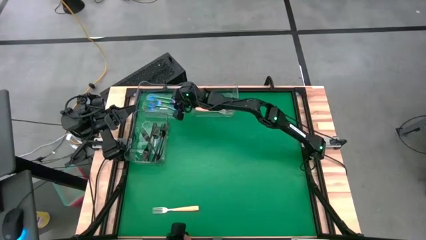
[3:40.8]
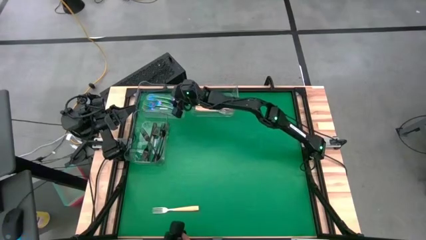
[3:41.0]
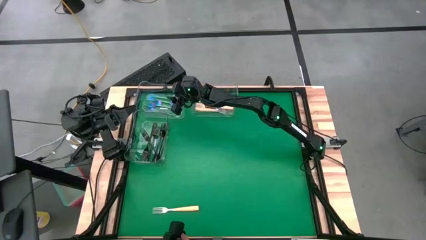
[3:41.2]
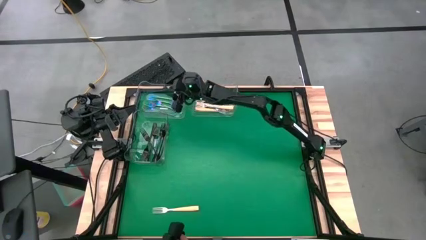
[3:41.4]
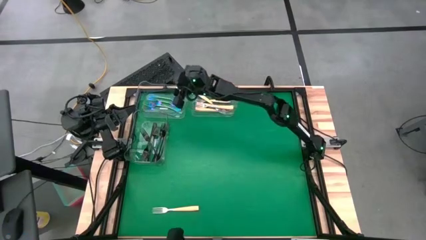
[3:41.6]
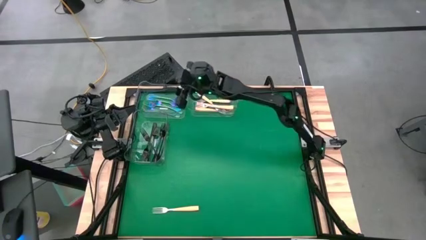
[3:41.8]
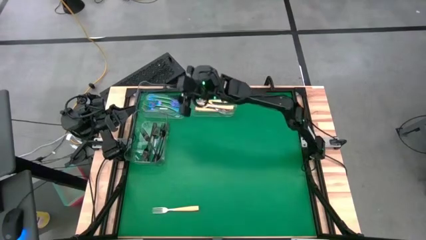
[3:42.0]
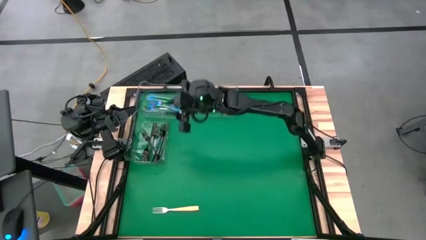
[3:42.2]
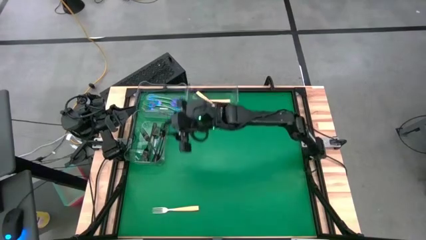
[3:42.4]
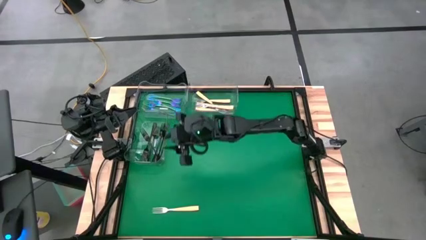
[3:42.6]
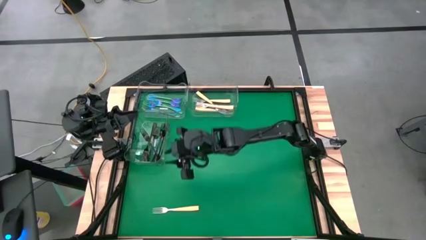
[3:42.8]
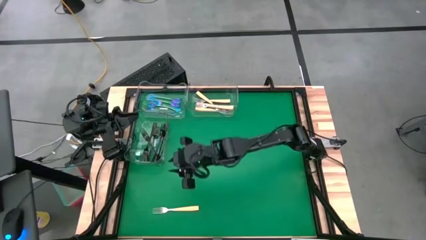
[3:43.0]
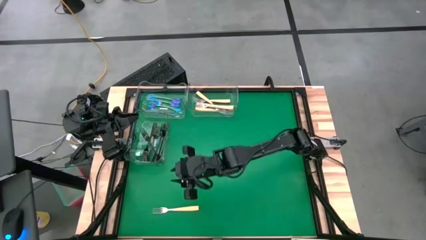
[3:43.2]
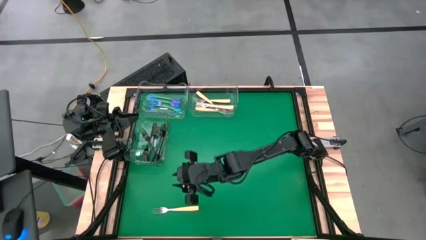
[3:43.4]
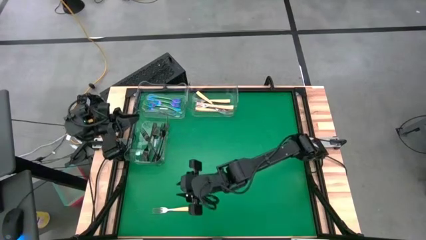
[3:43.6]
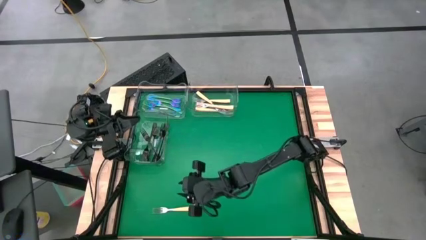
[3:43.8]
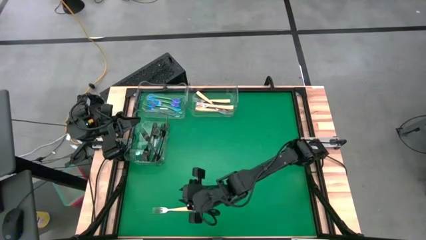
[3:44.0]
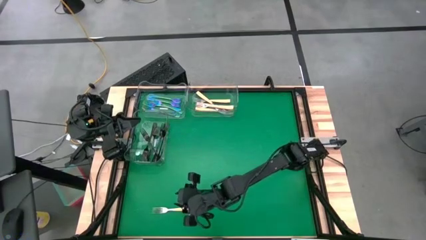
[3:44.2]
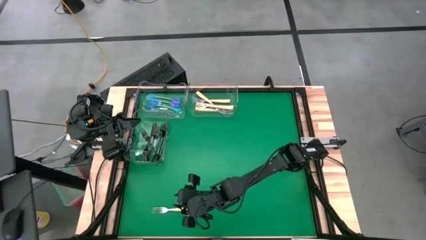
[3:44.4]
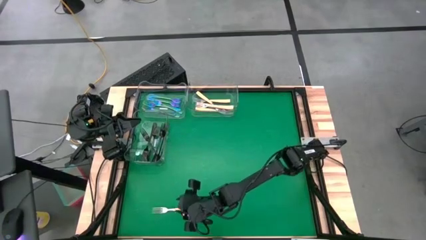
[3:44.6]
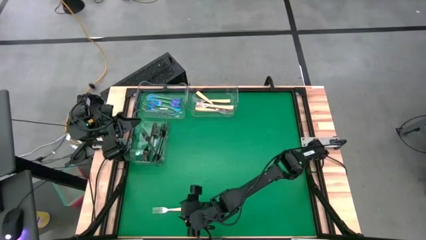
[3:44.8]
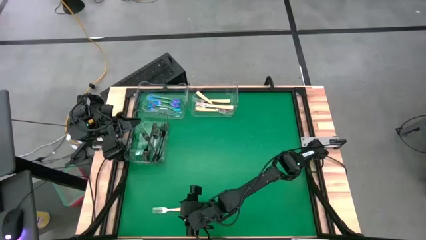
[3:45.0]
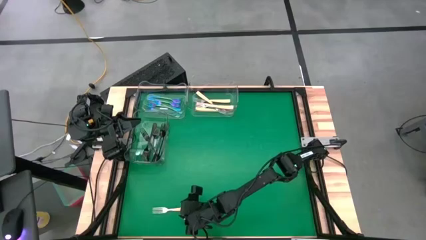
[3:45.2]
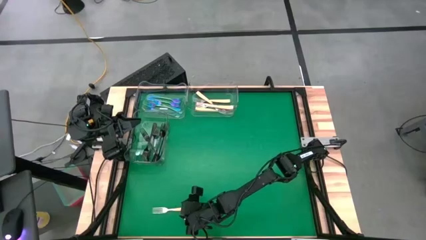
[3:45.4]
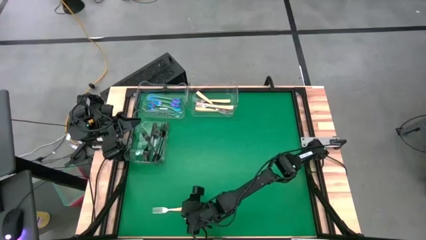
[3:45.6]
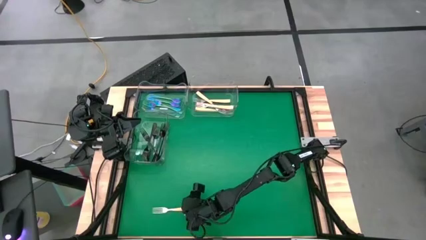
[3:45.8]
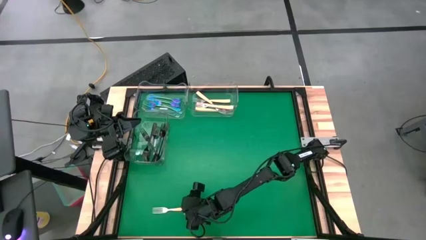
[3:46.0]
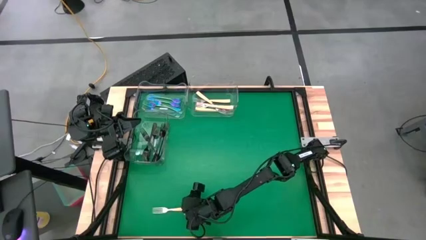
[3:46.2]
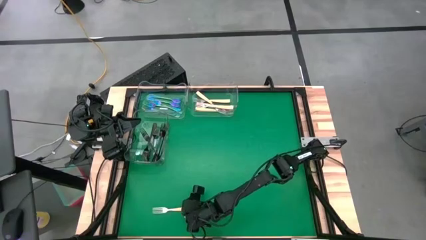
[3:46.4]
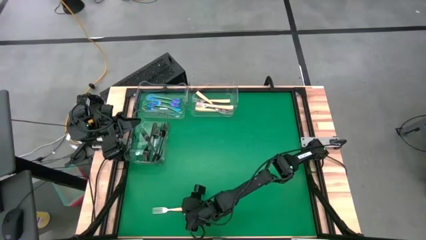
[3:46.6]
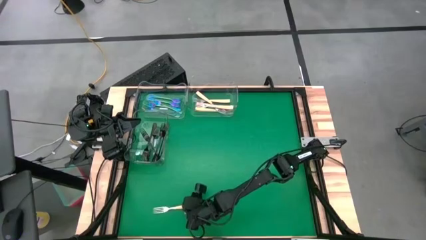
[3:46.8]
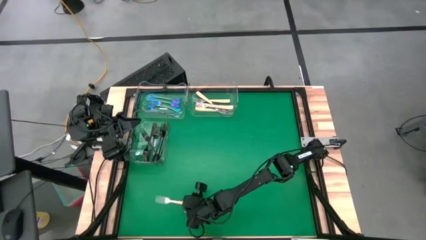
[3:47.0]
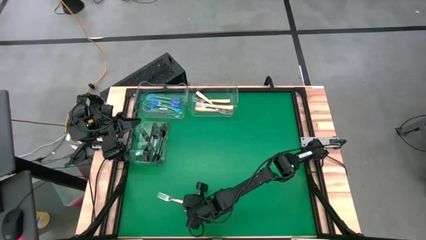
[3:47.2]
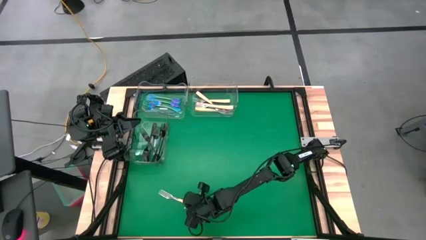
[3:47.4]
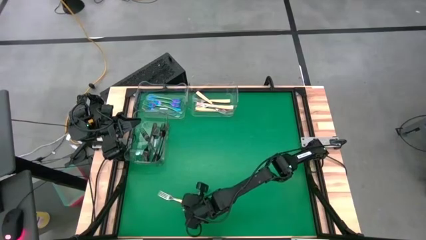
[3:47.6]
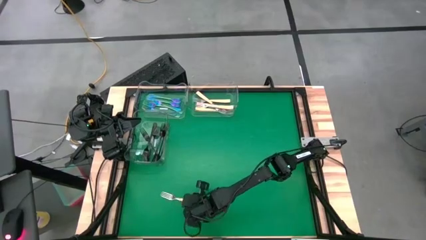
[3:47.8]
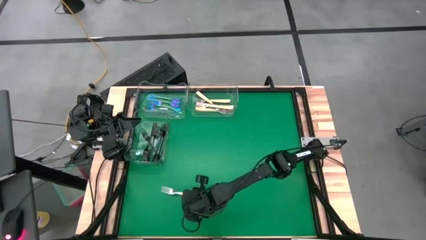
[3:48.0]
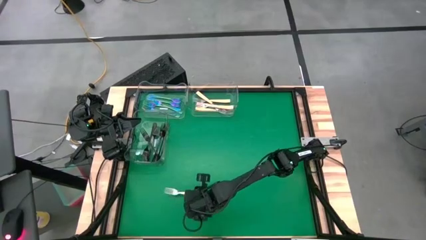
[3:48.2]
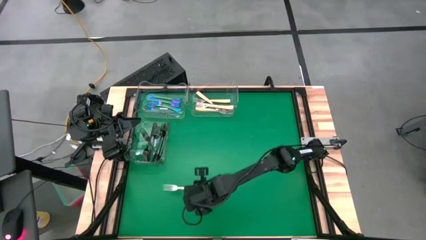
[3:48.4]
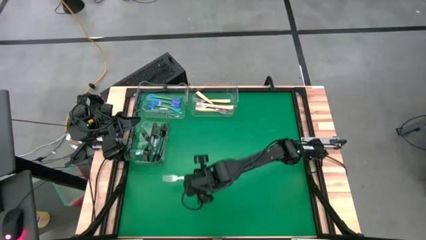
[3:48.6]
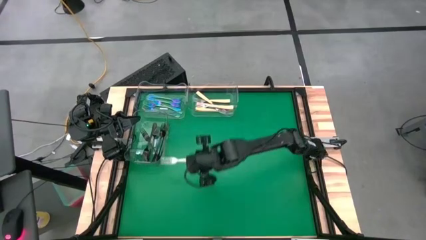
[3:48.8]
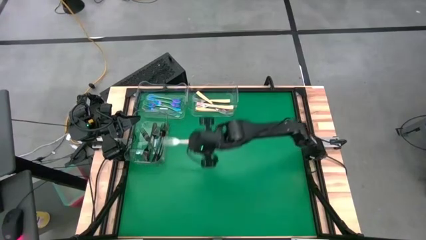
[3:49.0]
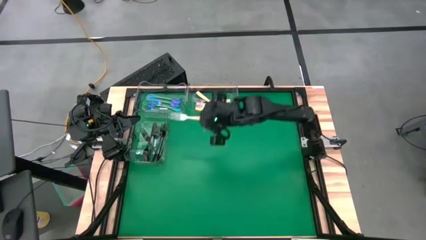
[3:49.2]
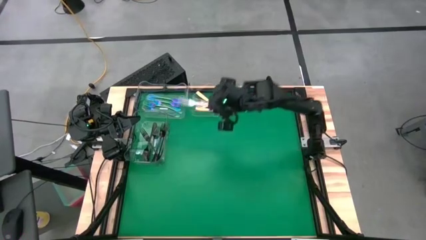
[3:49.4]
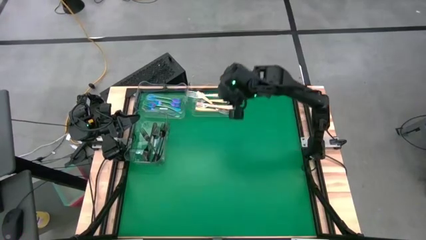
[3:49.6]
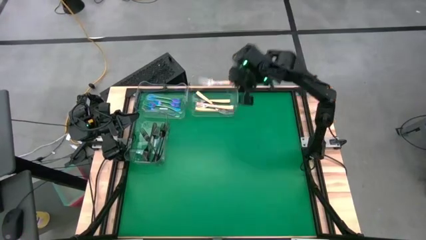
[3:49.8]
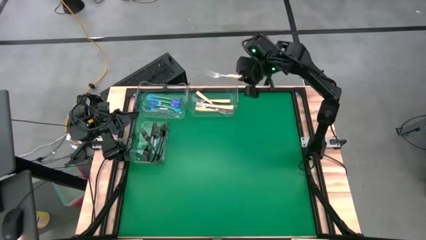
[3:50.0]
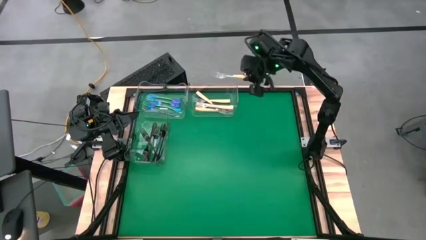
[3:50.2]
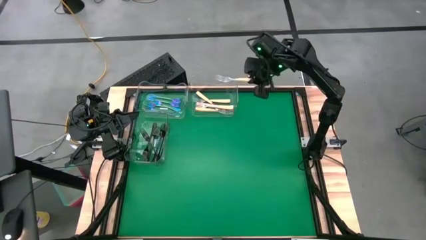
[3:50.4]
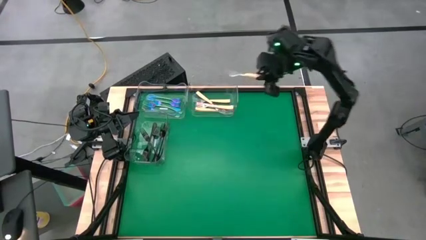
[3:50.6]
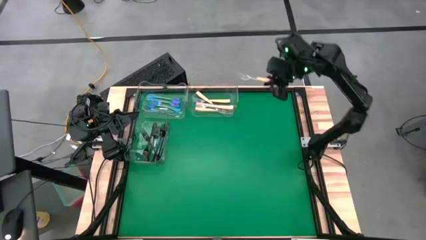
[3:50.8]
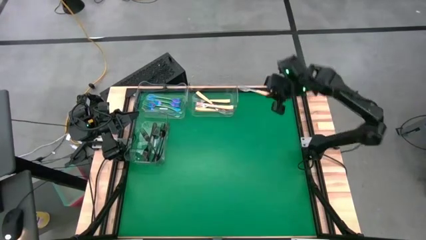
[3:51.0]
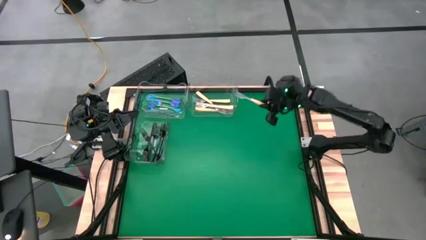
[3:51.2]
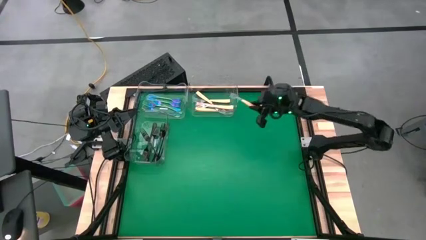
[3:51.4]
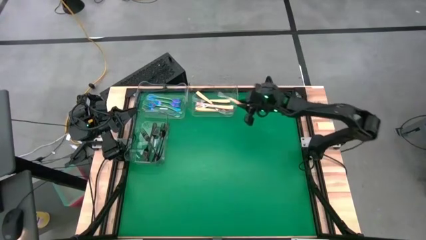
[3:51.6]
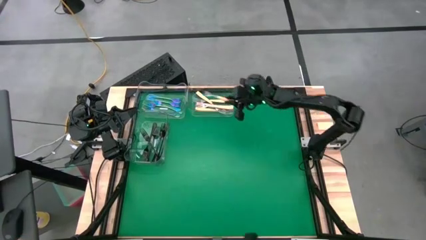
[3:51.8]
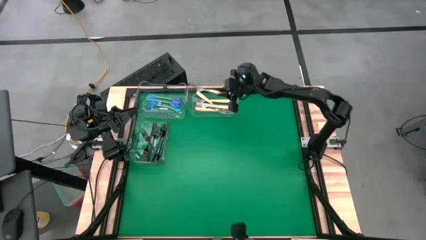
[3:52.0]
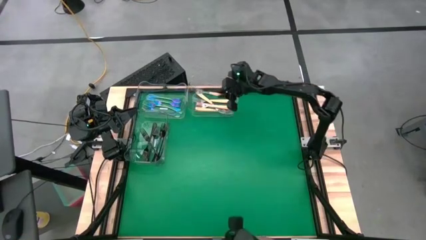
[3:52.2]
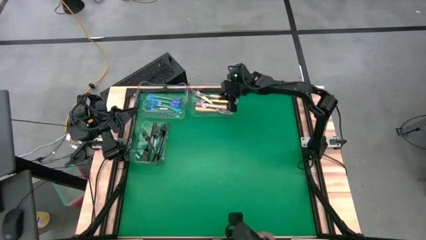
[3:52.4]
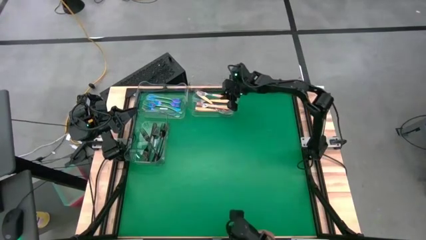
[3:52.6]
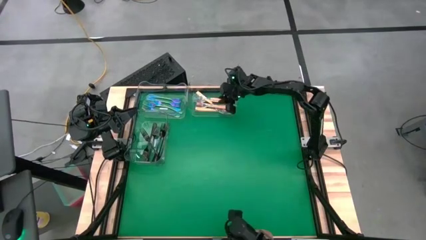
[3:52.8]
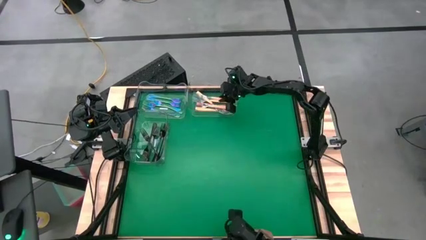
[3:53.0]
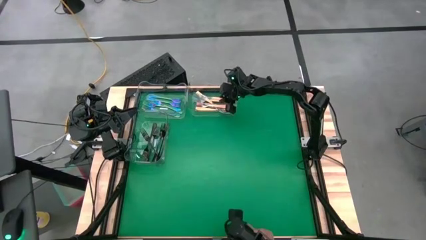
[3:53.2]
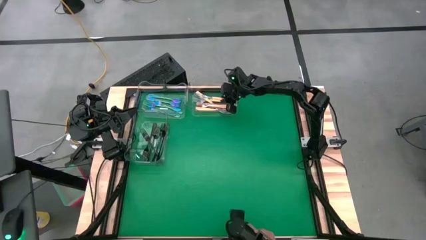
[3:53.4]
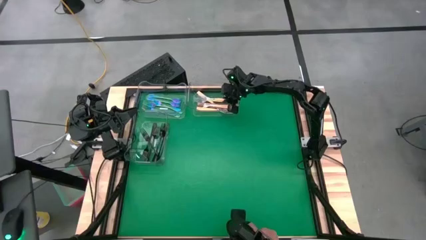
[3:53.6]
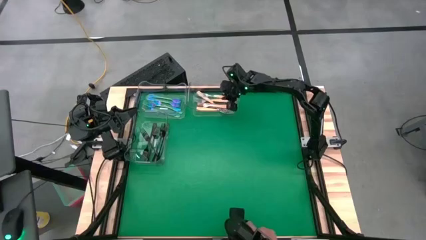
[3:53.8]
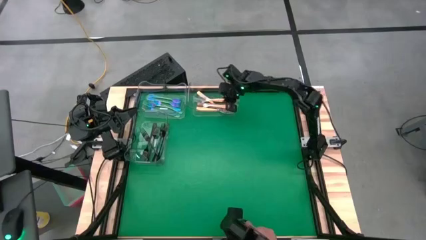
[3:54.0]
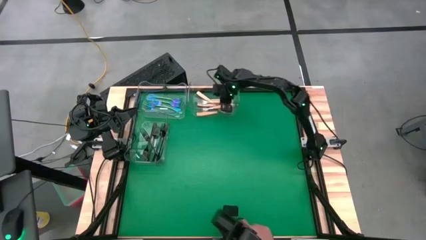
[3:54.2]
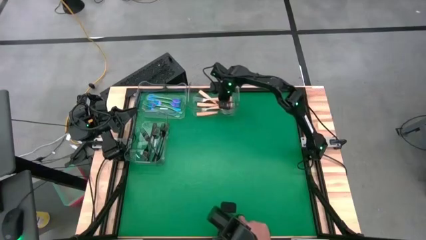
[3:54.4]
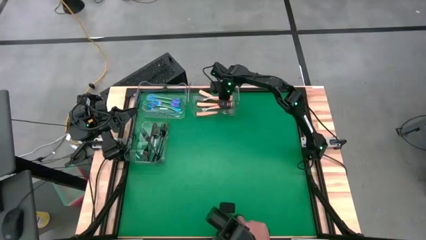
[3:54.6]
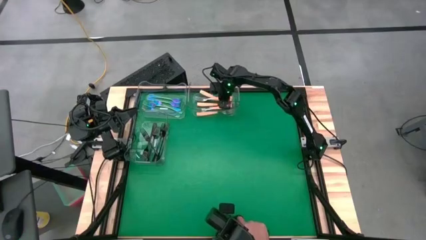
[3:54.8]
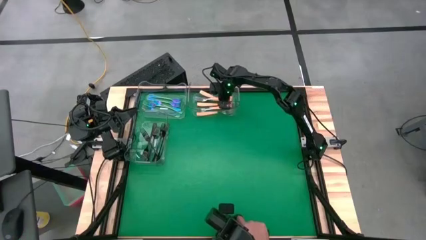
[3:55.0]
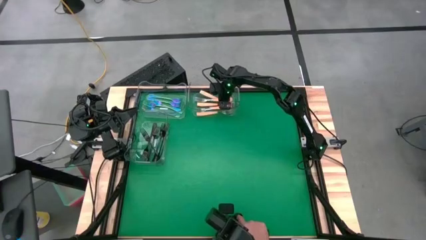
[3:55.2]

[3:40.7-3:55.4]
Task: Sort silverware by color (type)
Put the yellow fork into the top right transparent bin
